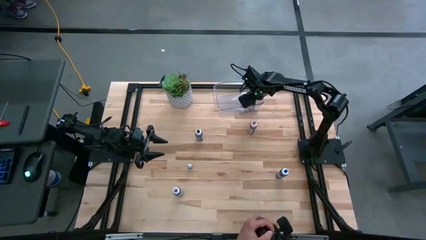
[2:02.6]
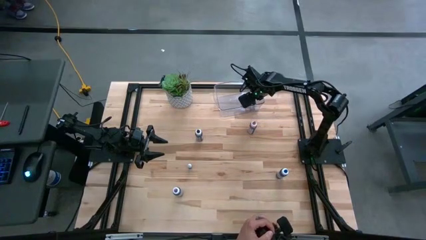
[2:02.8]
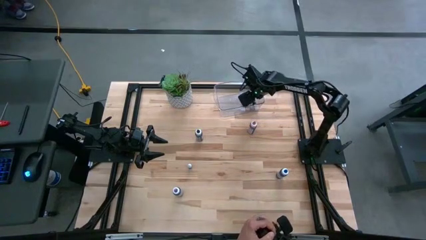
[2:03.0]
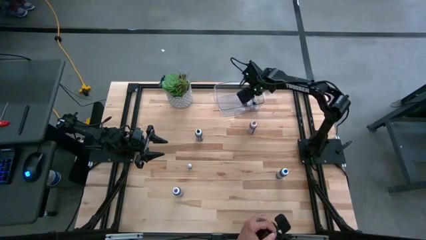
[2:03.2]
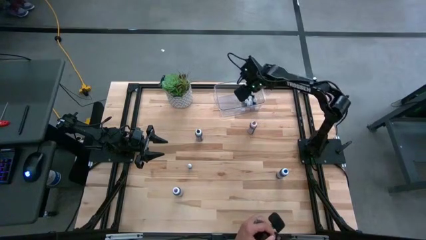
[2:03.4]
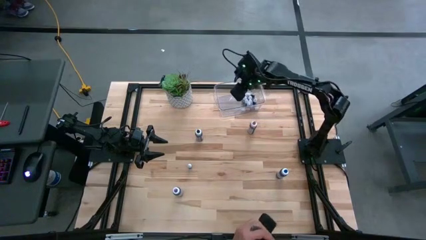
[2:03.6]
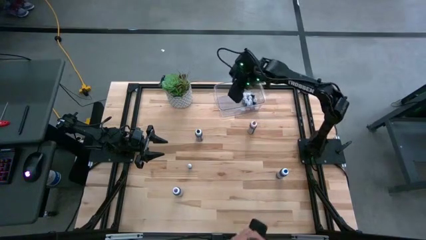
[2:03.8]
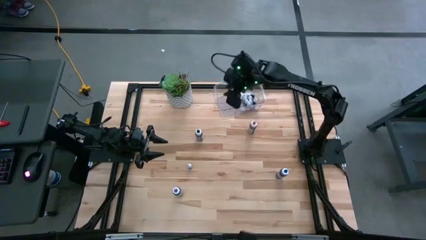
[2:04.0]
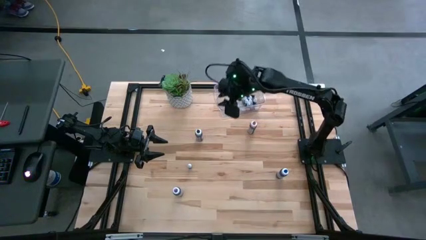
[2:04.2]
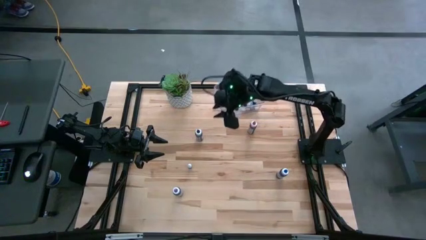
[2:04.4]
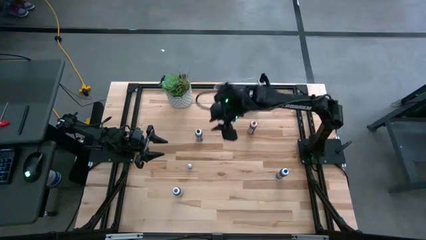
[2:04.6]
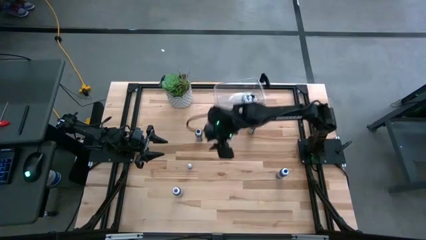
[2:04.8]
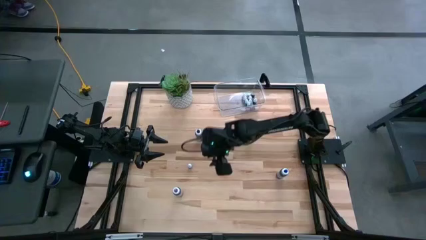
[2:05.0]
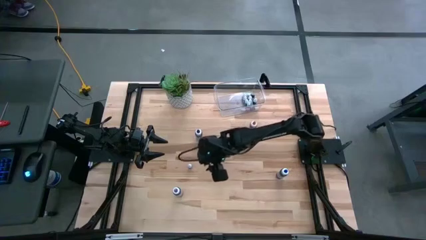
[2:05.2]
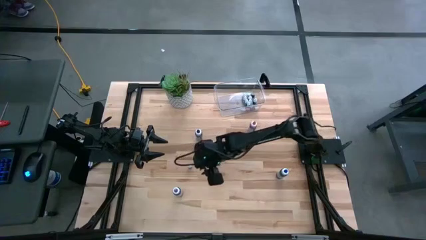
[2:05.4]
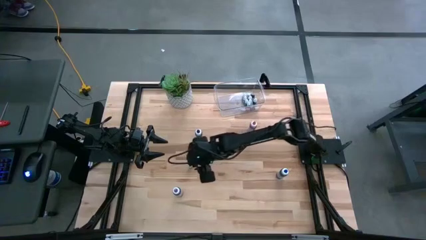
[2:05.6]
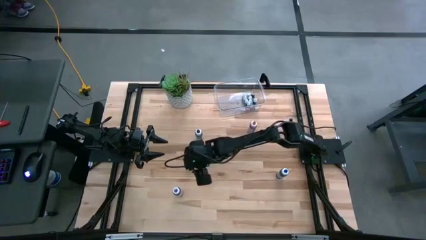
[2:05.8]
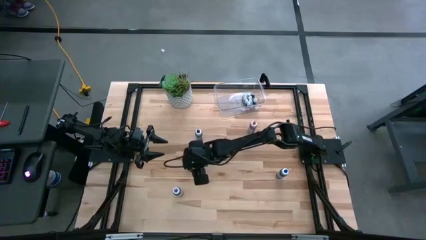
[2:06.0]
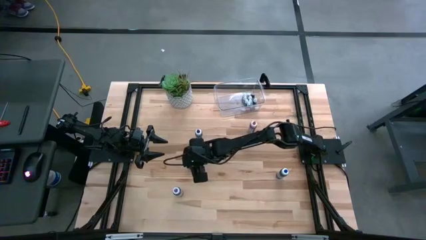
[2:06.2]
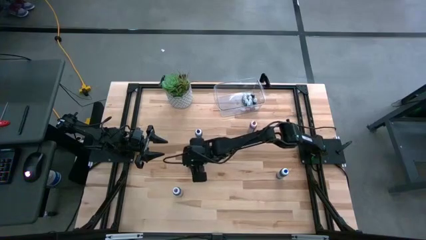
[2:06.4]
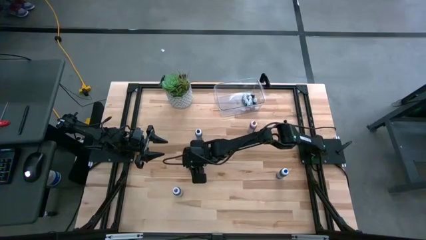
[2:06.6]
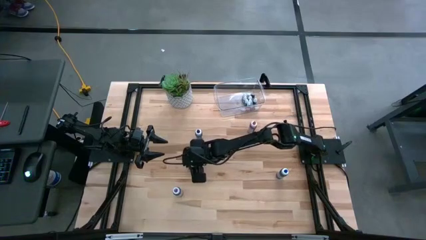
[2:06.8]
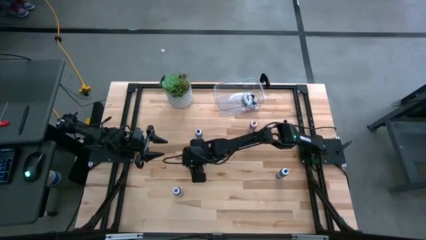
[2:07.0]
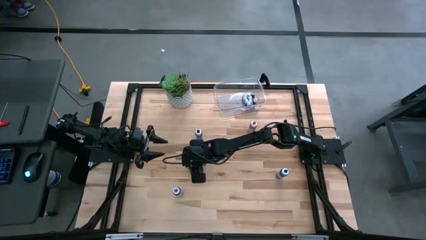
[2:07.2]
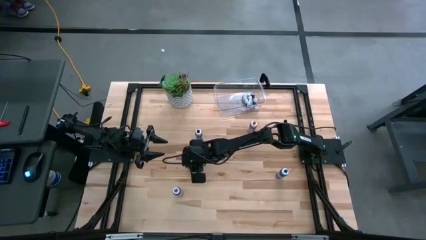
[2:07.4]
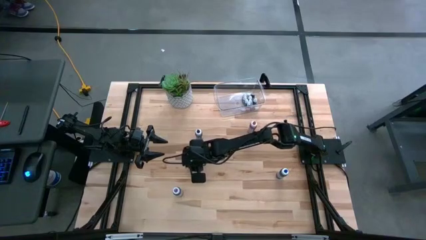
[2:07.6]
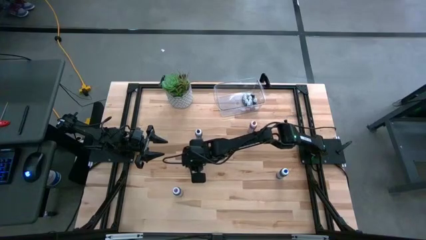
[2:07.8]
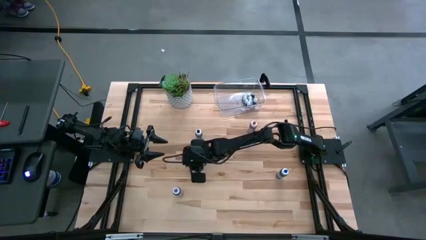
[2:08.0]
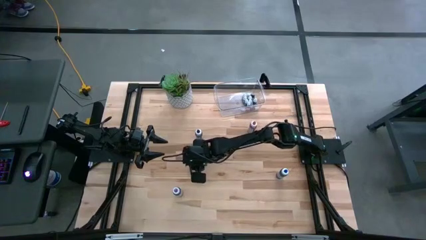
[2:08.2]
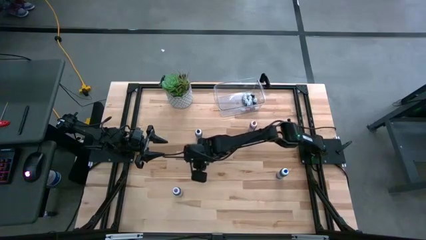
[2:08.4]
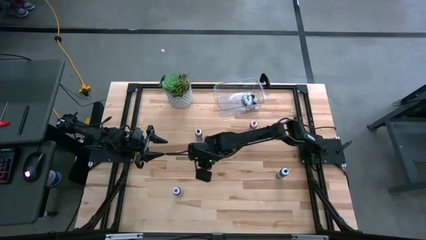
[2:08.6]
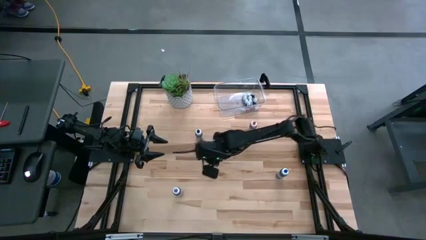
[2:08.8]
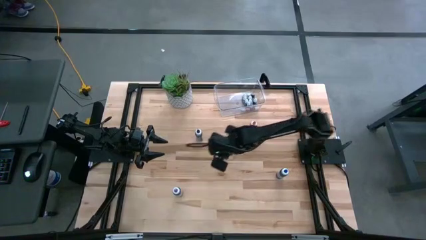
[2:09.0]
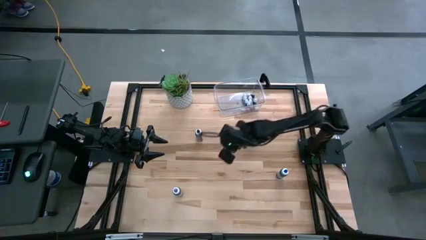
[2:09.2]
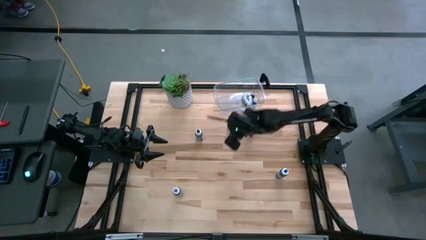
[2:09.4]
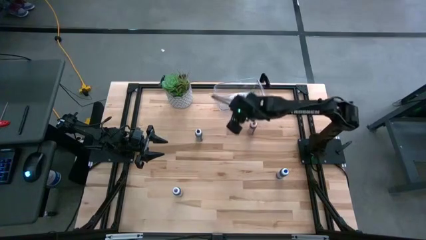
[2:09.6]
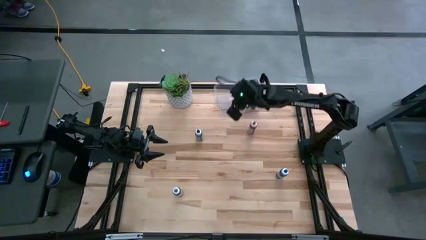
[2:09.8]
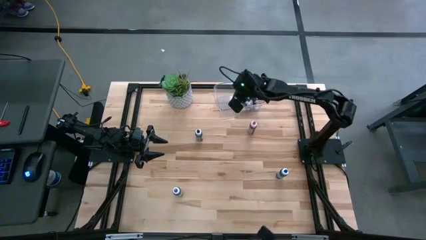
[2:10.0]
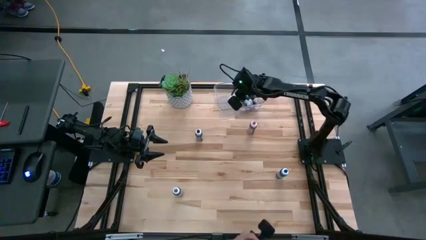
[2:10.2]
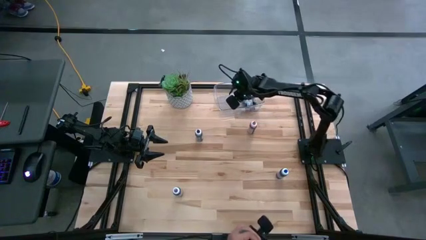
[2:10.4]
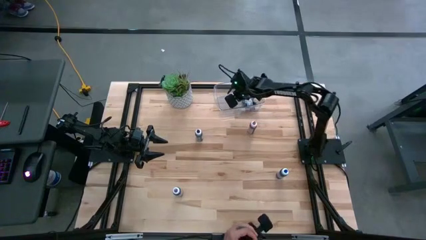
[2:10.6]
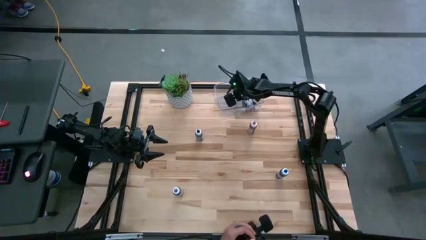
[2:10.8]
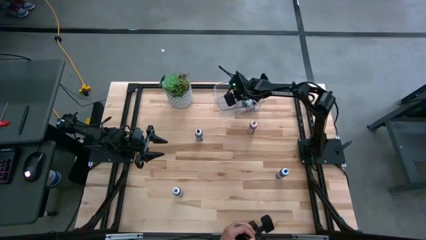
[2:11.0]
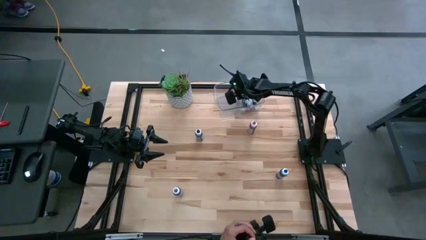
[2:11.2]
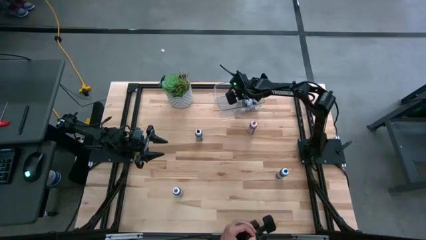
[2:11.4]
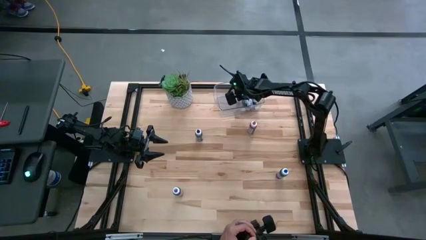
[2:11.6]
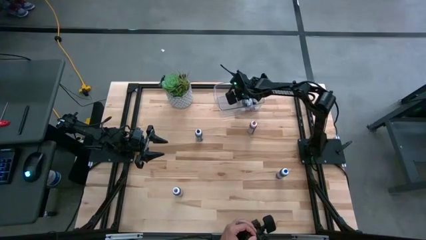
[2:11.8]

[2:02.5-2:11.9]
Task: Pick & Place food coloring
Put the small blue food coloring bottle into the bin

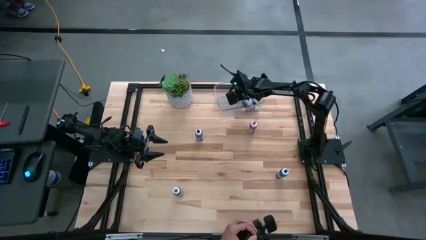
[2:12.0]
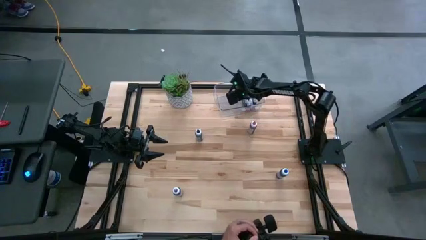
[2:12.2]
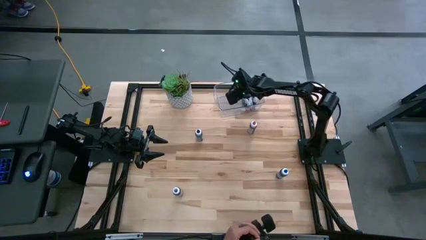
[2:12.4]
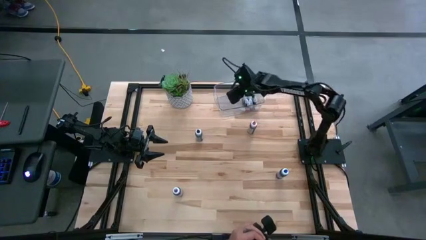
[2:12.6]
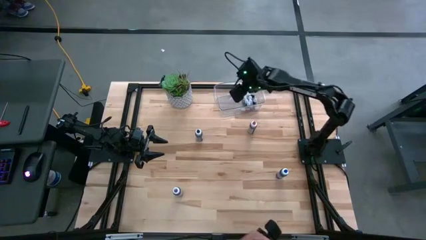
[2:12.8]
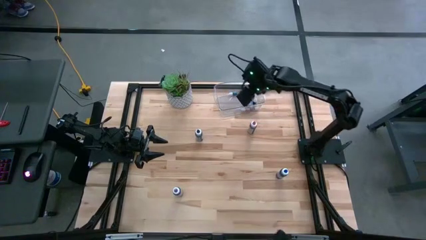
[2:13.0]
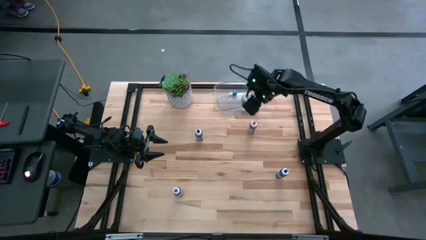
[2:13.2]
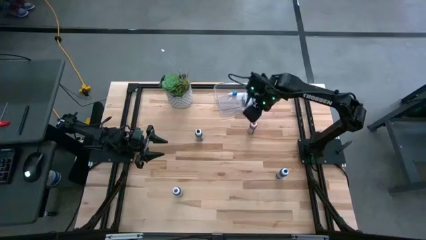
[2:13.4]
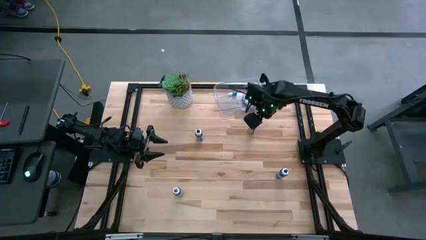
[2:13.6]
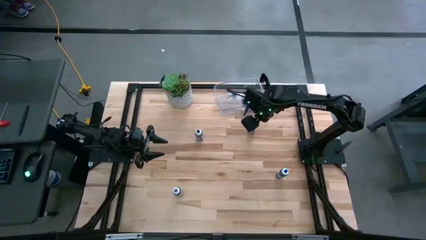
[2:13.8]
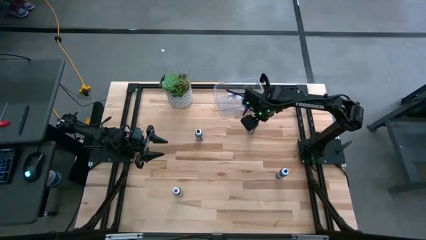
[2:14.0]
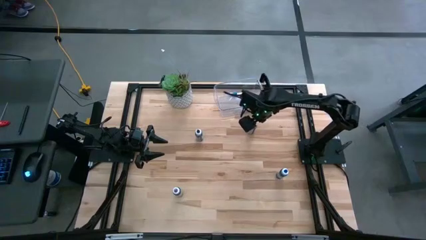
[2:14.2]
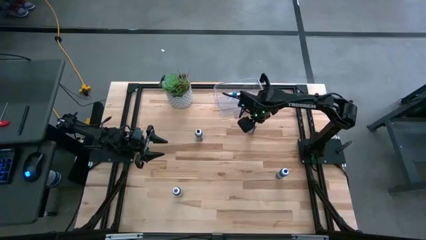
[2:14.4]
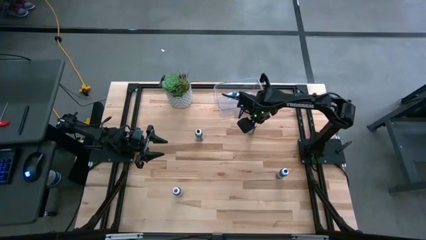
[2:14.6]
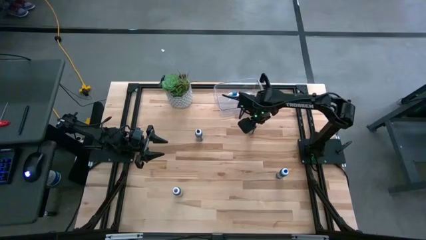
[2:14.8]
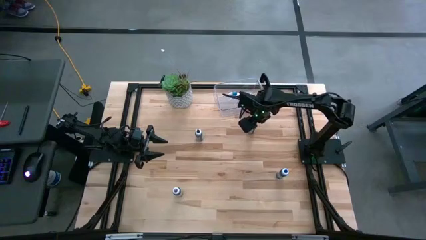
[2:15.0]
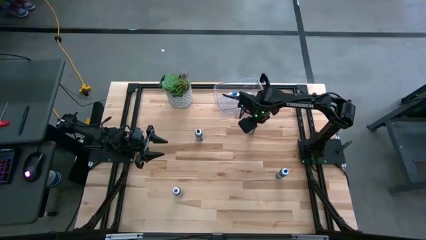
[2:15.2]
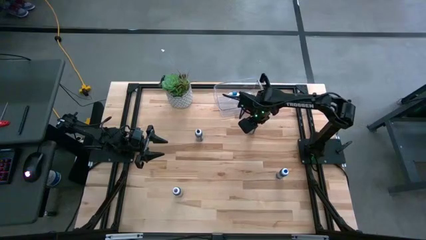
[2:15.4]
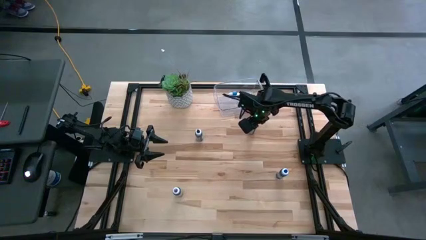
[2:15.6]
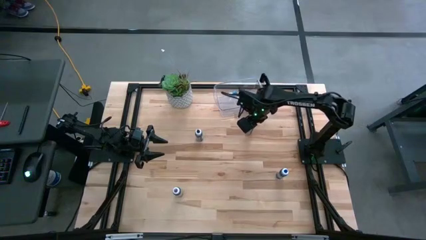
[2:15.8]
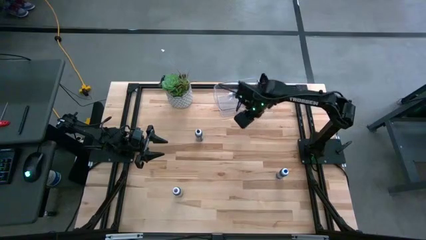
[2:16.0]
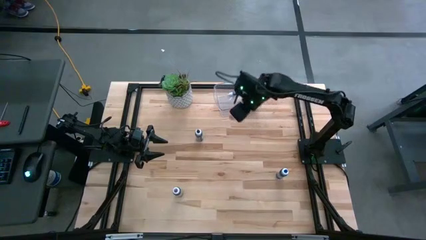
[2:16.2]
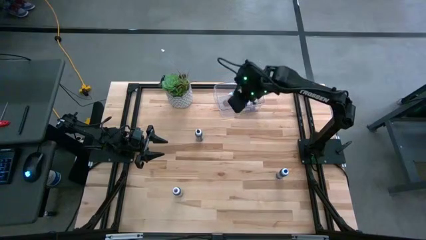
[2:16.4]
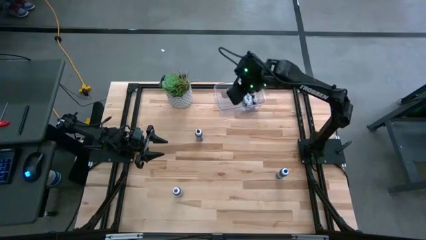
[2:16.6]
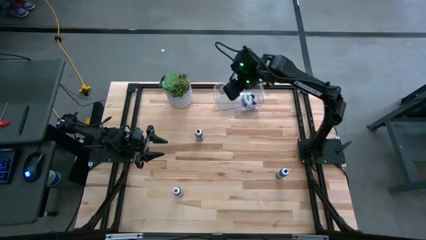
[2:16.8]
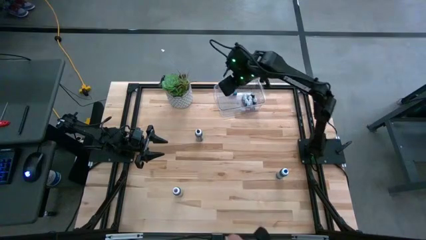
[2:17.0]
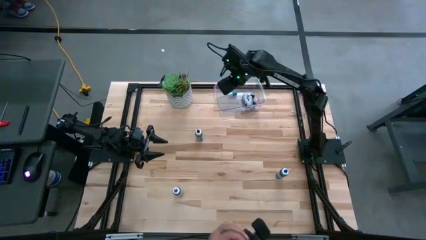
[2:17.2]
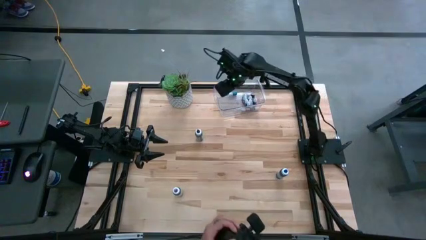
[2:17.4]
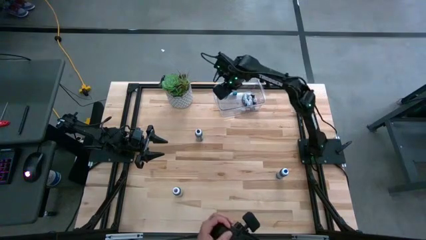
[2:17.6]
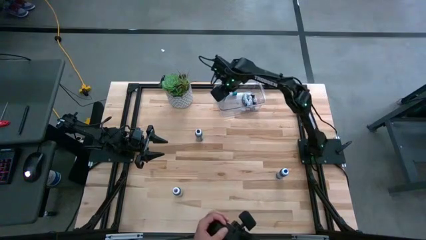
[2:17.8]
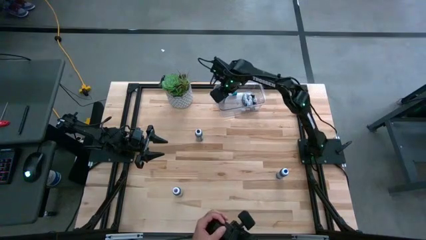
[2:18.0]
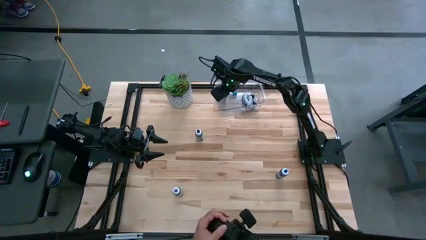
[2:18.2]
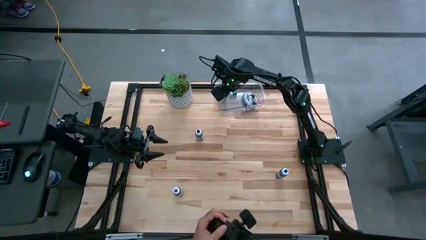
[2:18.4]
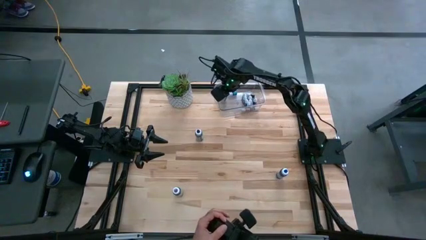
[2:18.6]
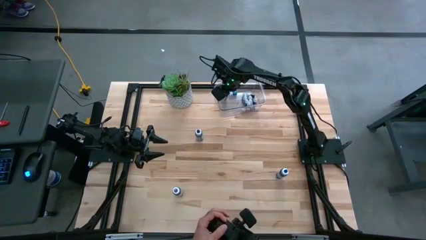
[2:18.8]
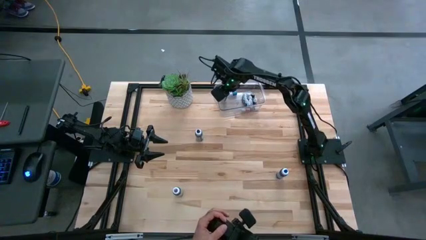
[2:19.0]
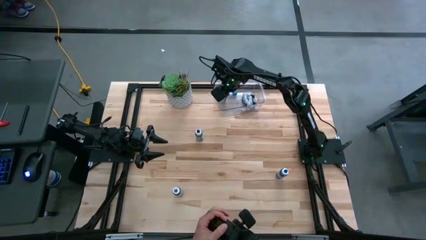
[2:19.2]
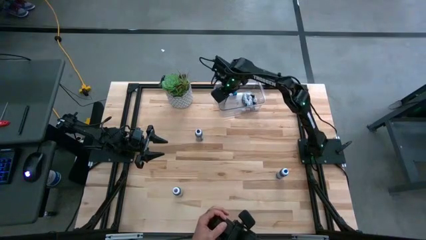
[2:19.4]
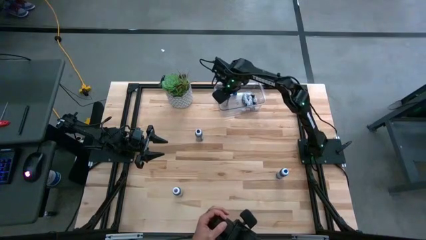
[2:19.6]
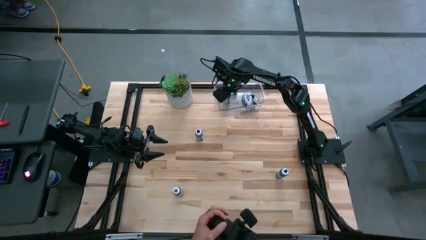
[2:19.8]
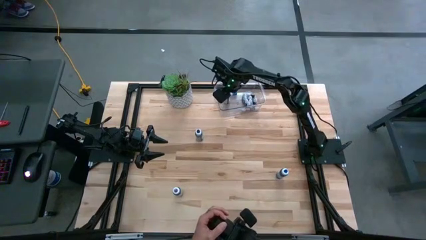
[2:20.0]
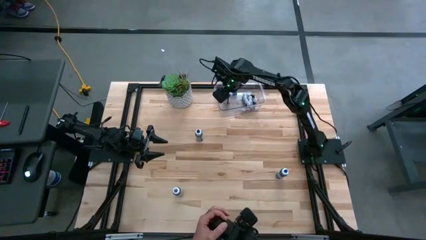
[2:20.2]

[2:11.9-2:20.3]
Put the large pink food coloring bottle into the bin
